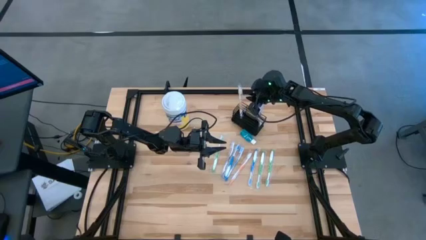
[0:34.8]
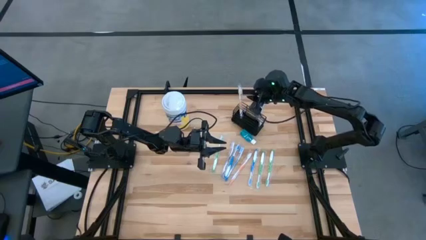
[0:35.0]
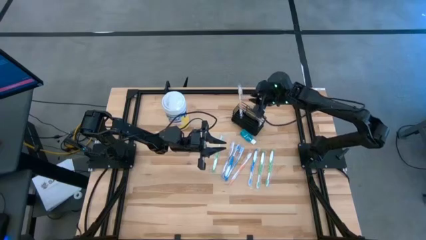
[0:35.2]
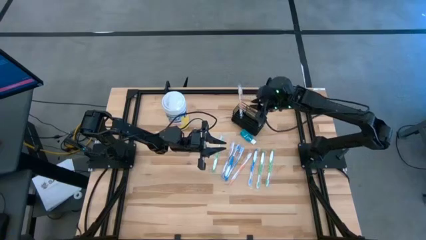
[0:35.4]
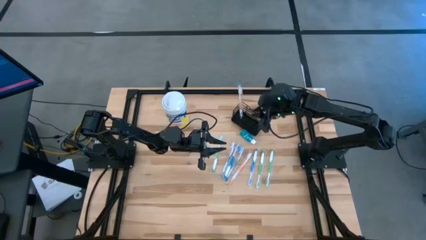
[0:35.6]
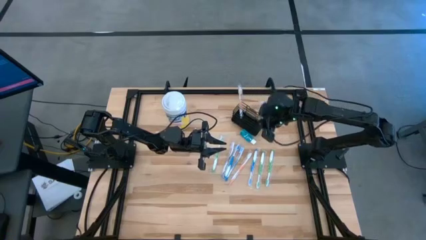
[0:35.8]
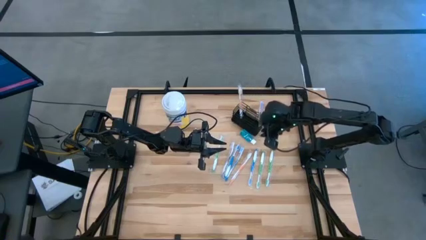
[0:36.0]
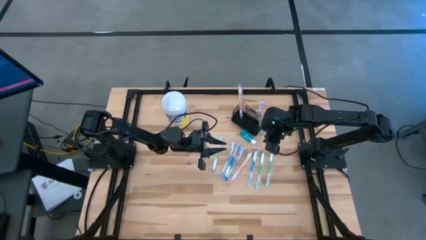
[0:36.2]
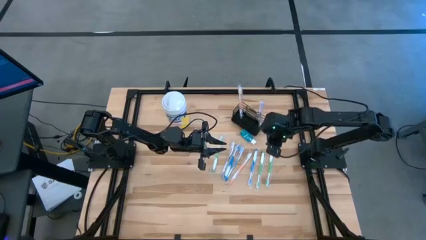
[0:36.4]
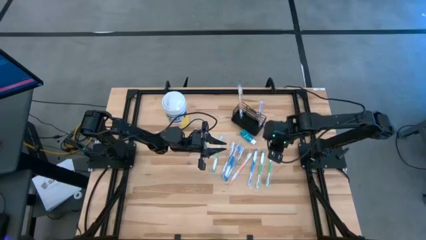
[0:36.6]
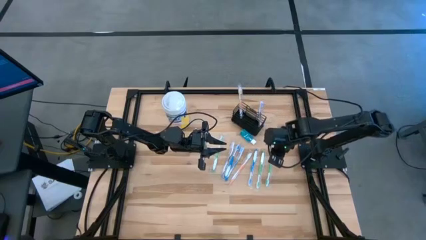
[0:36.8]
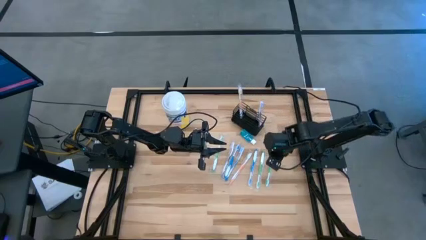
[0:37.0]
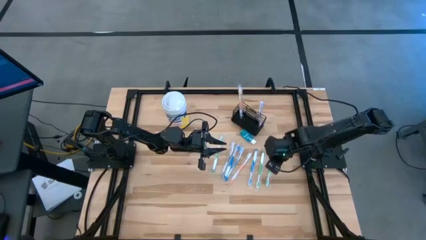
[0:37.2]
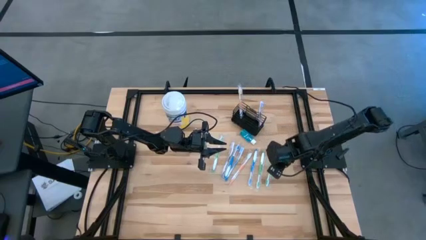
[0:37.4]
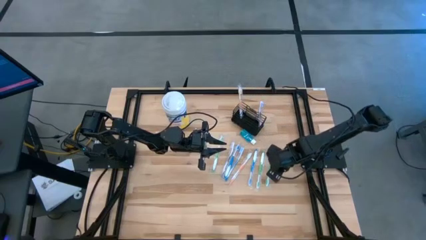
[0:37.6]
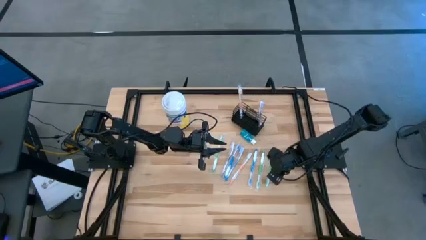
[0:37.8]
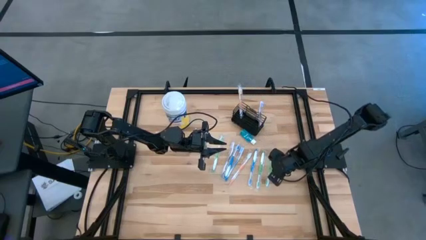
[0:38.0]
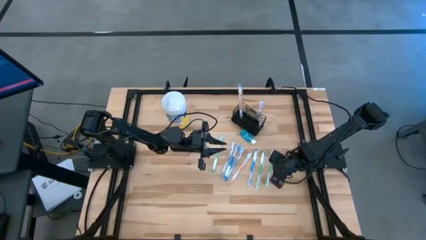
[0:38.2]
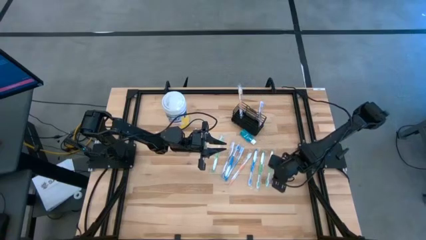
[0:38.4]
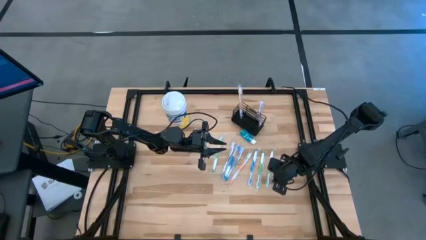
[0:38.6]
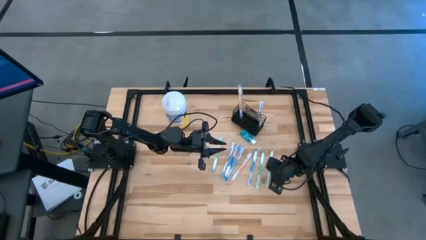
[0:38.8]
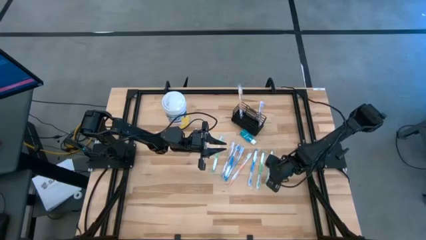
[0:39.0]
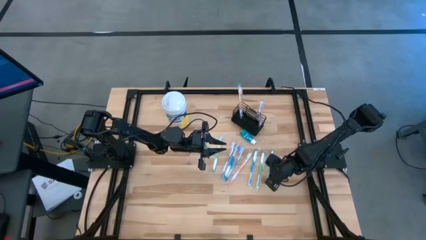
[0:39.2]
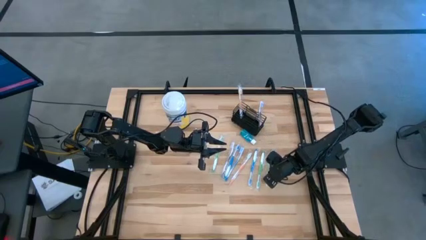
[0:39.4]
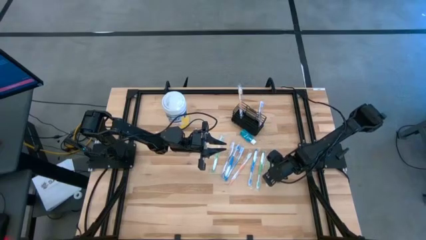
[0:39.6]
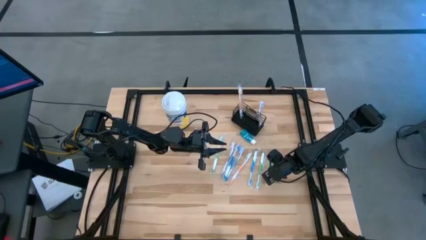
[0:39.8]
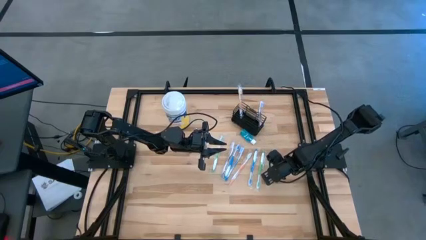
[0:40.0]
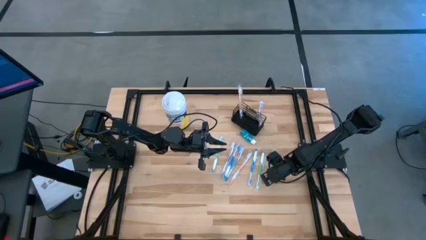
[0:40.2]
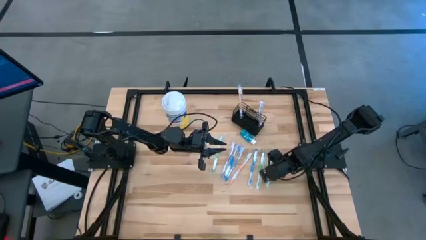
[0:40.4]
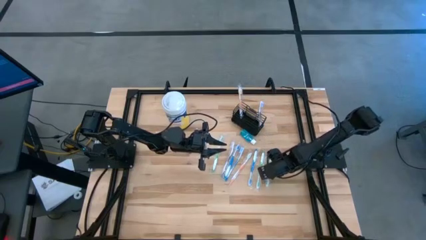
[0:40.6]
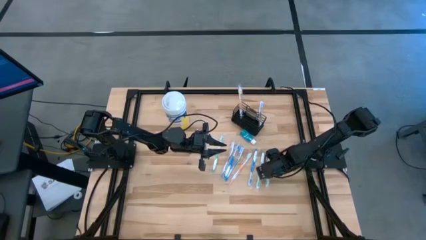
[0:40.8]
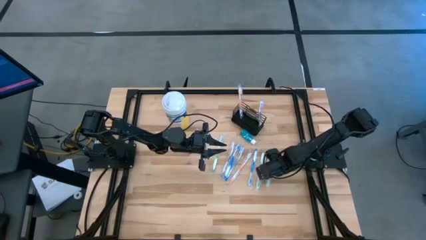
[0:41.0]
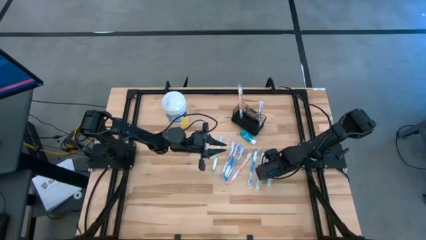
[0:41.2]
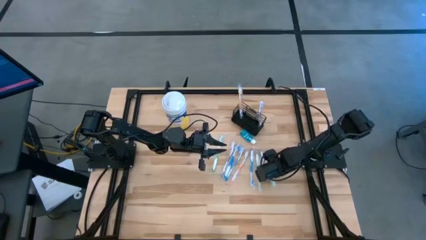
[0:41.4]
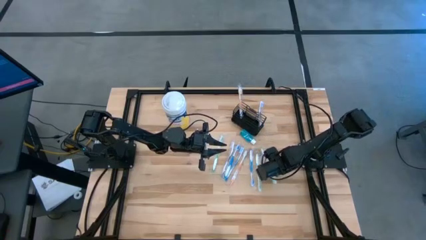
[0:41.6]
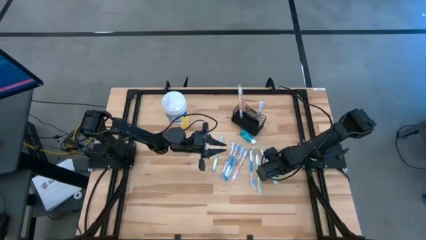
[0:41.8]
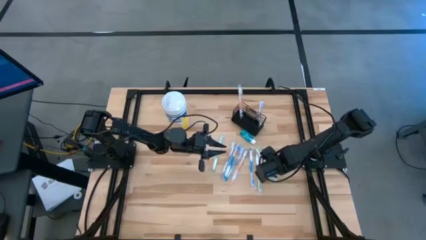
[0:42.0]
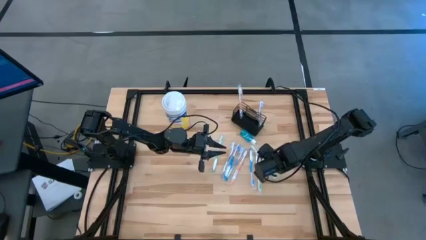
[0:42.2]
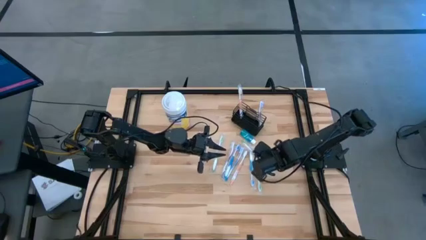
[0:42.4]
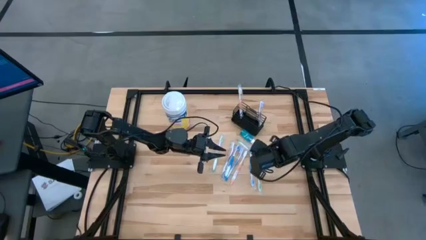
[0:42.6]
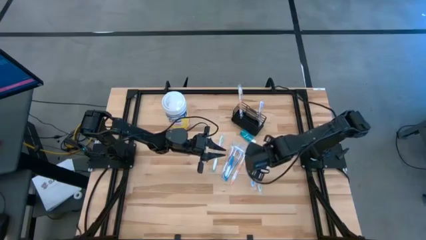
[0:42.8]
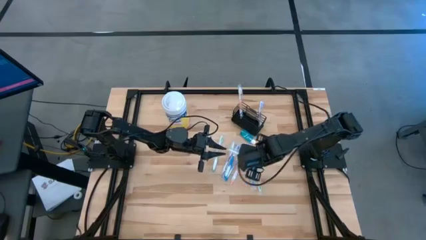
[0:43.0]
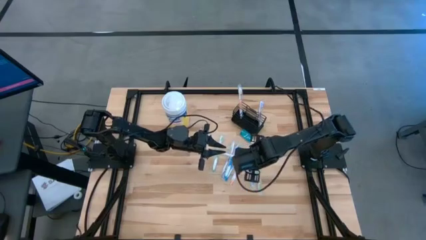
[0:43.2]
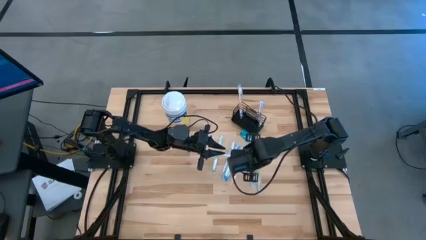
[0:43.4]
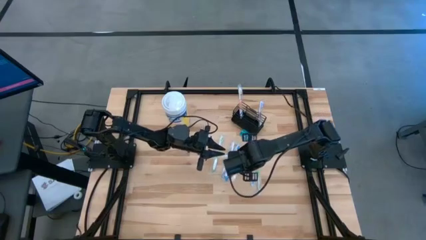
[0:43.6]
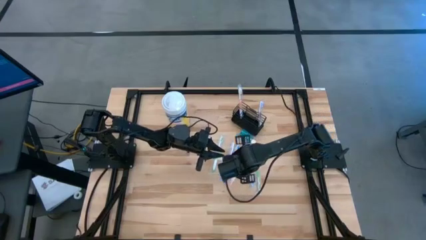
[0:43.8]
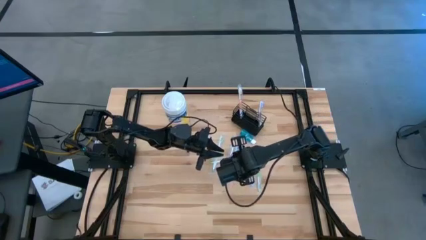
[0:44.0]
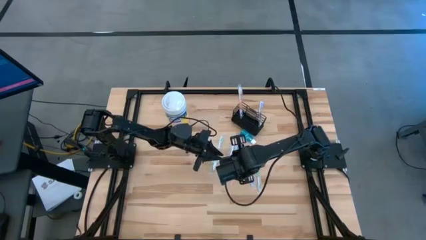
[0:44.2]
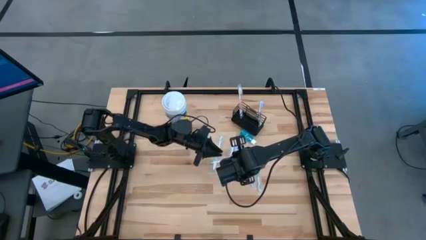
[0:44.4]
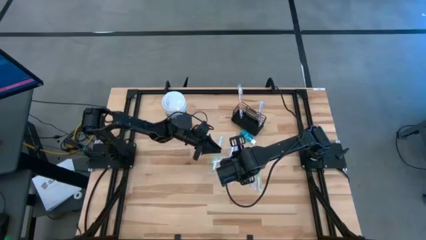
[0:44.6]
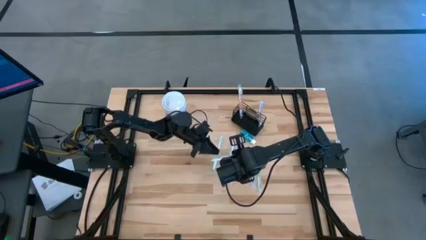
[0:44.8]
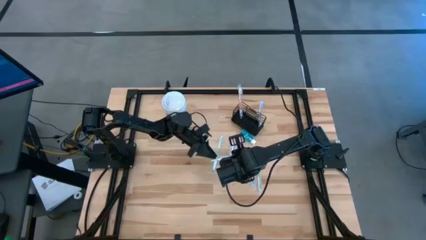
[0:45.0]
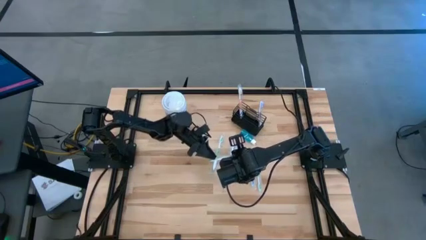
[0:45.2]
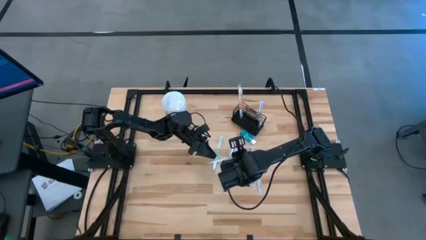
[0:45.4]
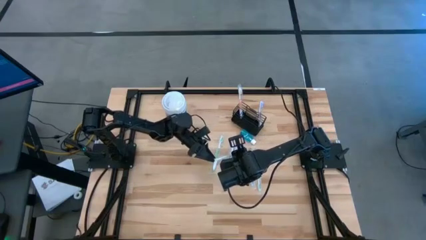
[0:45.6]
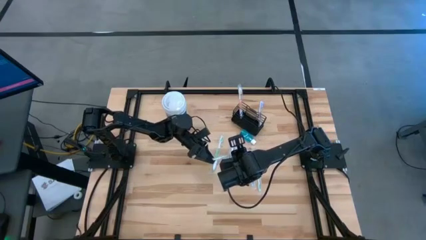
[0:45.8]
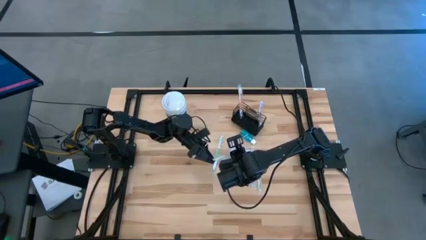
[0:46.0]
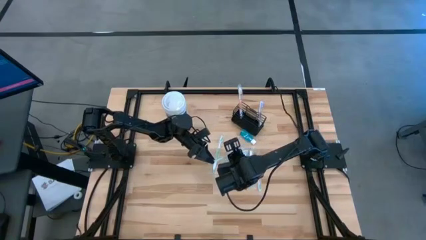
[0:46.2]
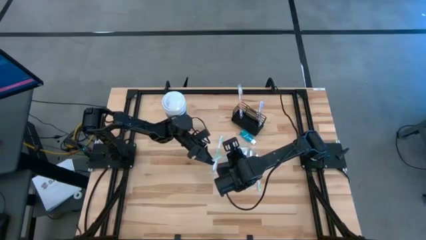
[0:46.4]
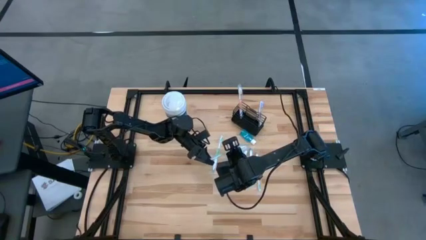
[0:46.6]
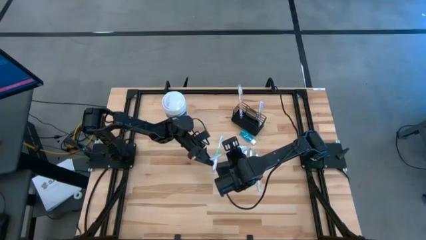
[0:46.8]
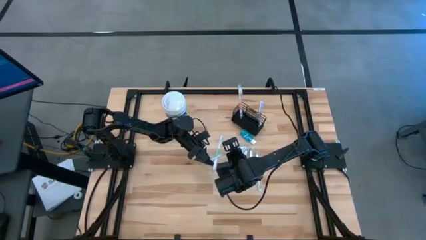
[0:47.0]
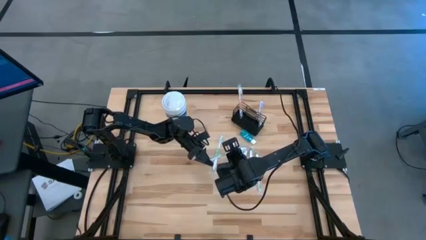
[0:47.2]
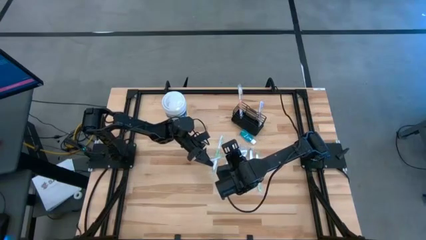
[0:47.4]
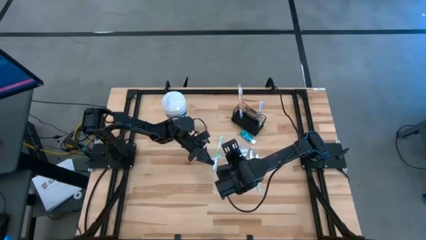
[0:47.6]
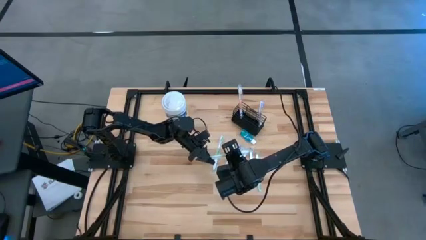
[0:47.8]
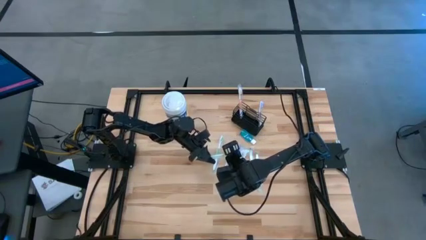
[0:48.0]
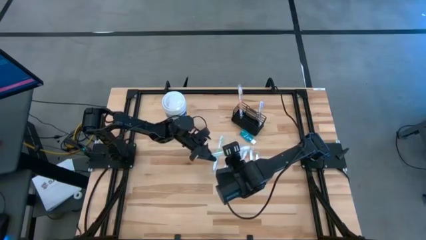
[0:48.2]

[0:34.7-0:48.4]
Task: Pick & Place toothbrushing station
Put the right green toothbrush into the black wire organizer
